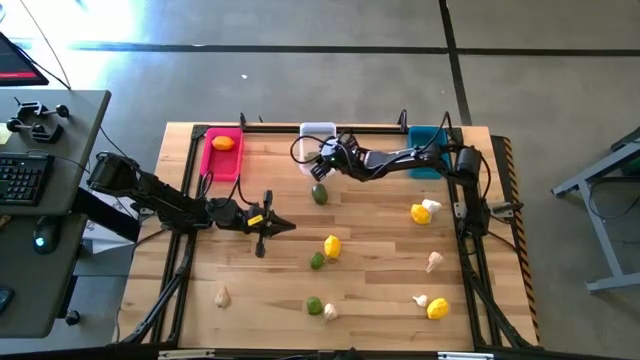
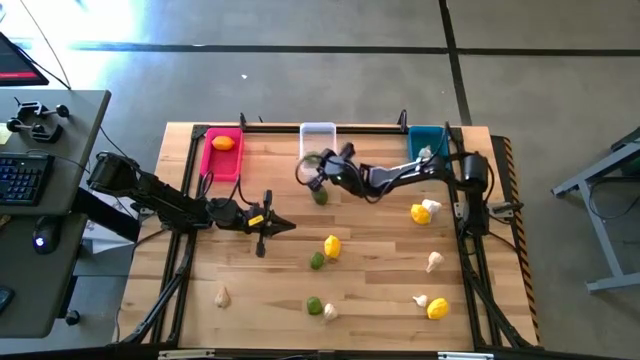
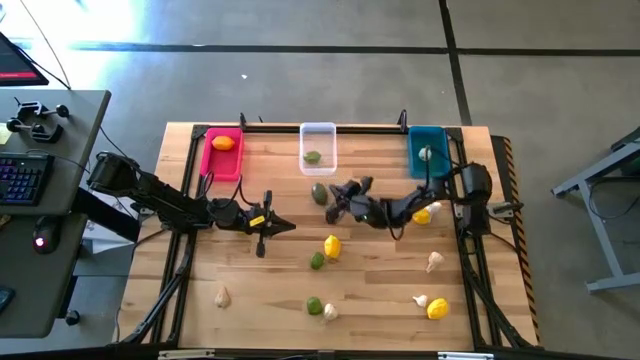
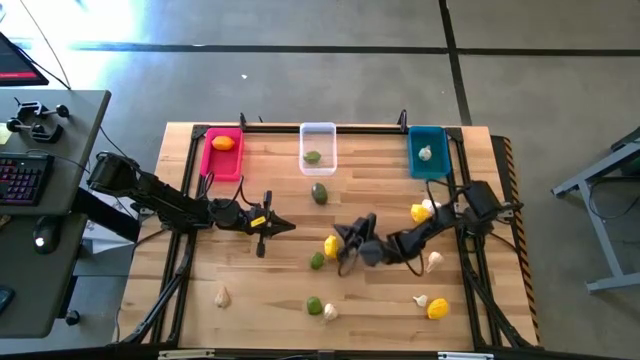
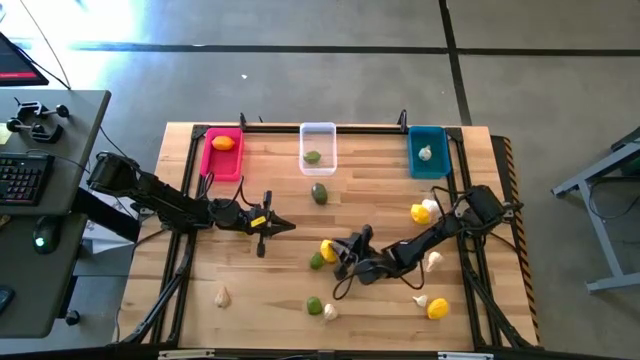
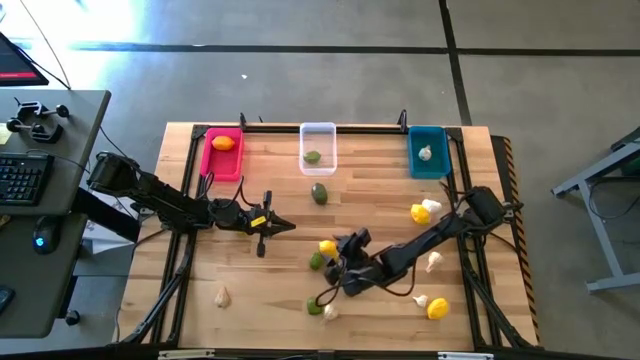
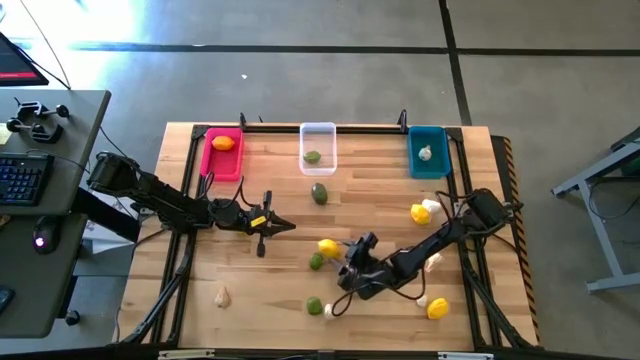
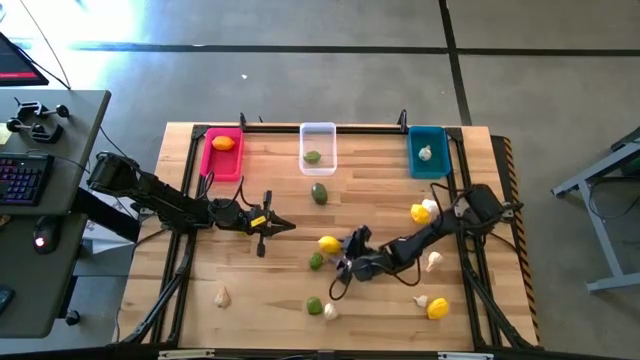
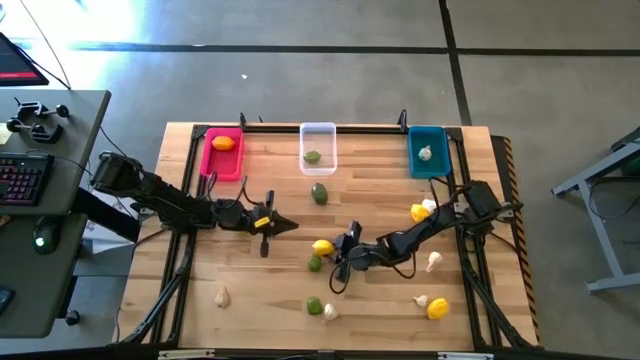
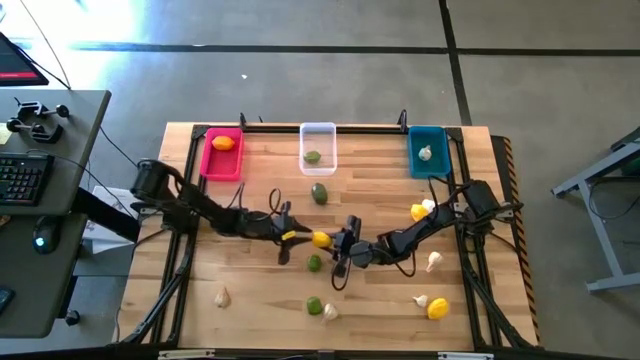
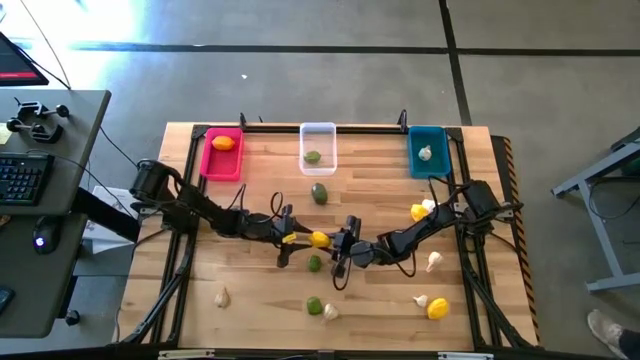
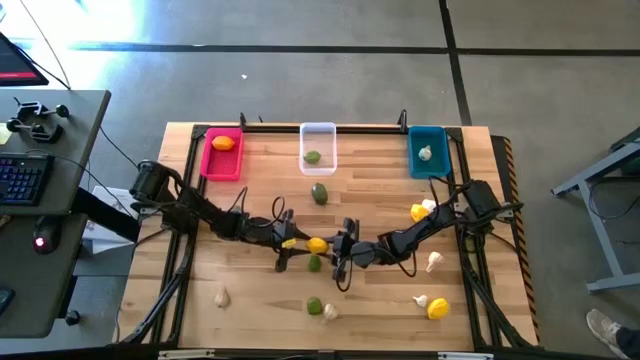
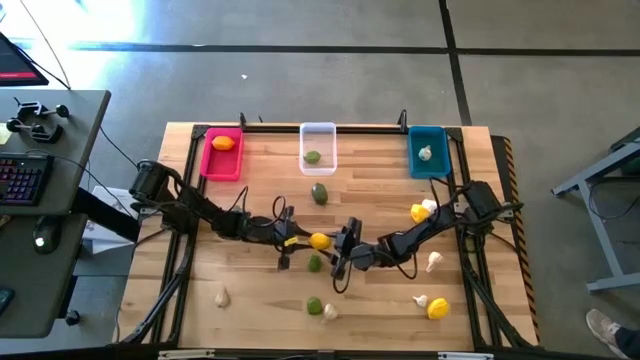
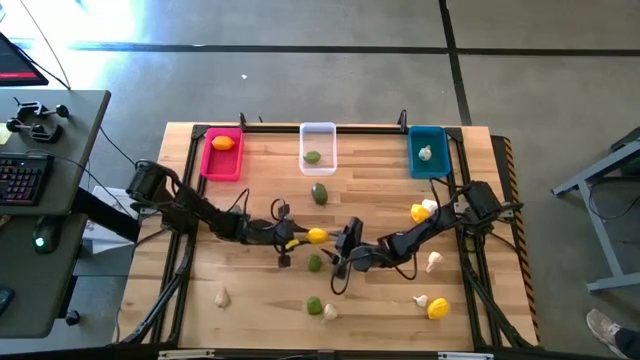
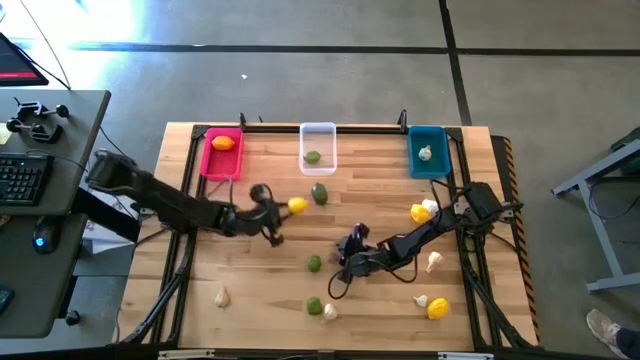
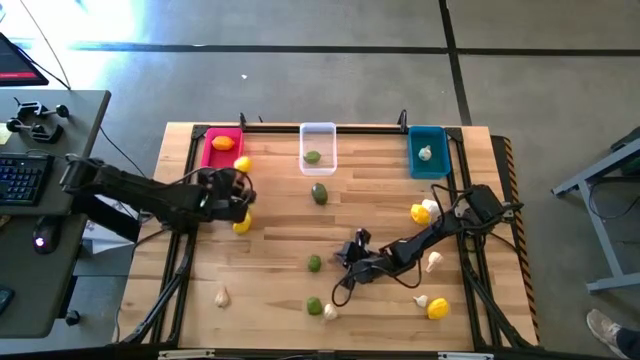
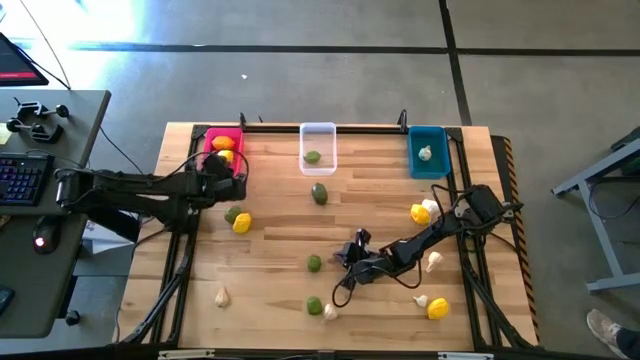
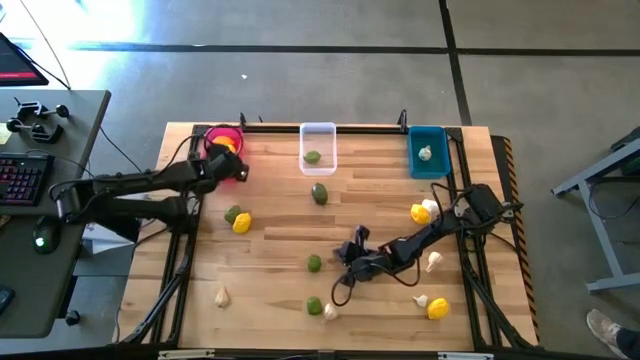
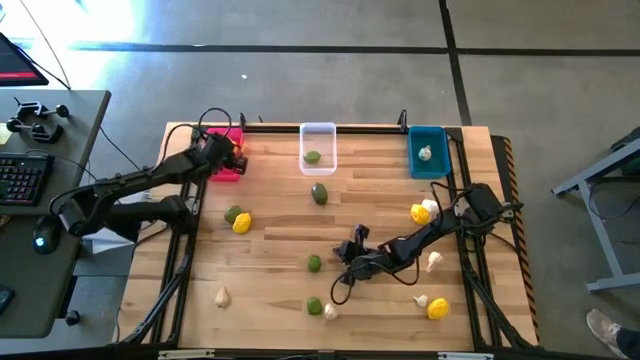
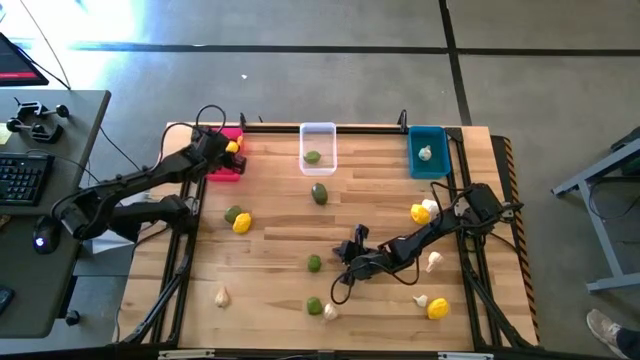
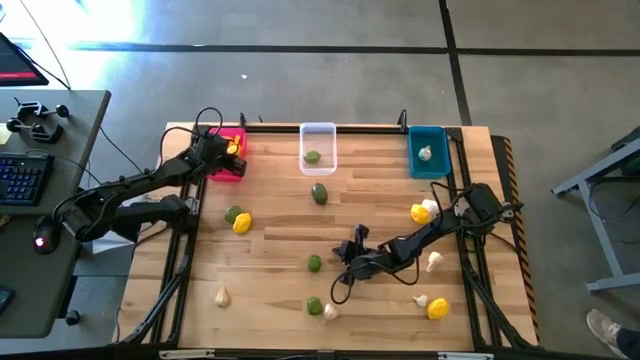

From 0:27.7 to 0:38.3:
Task: Sort produce into baskets
Put the lemon into the pink bin

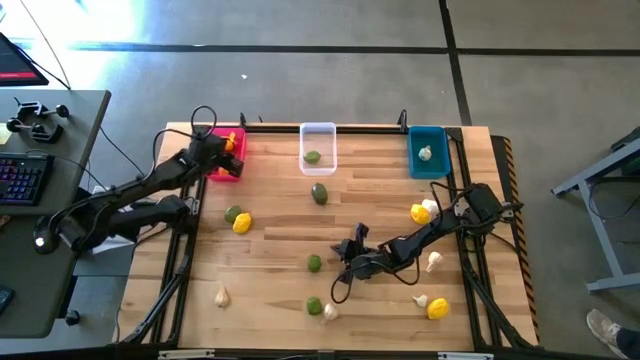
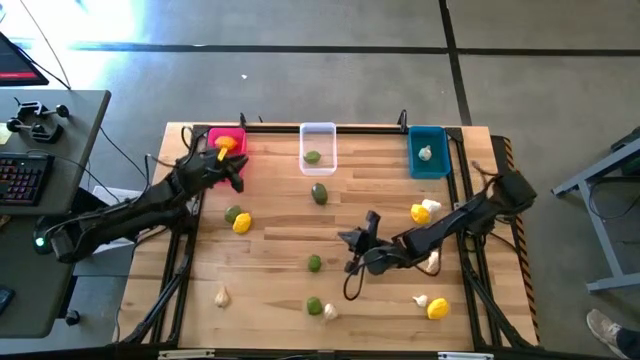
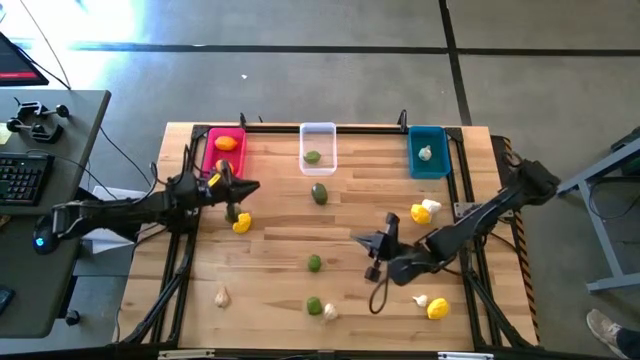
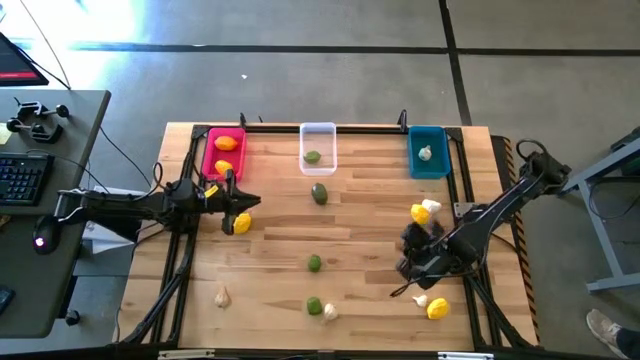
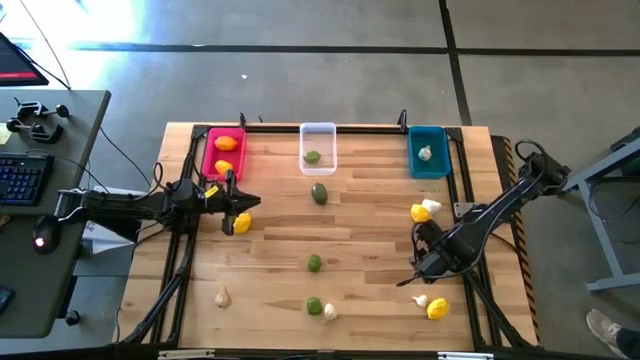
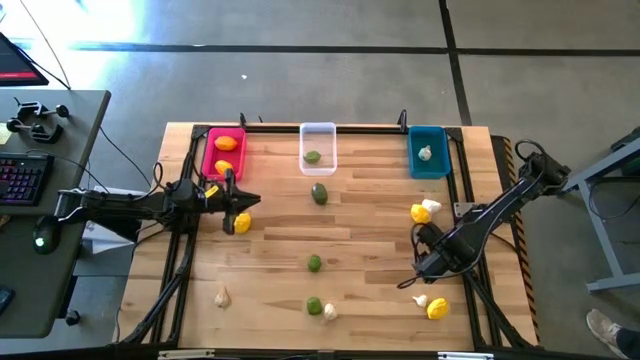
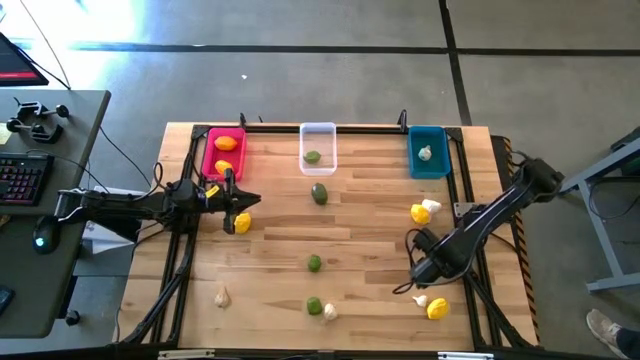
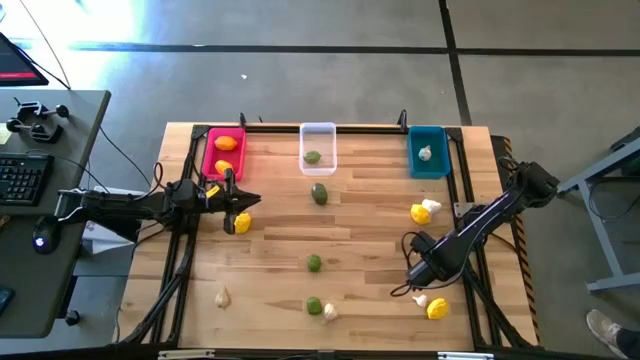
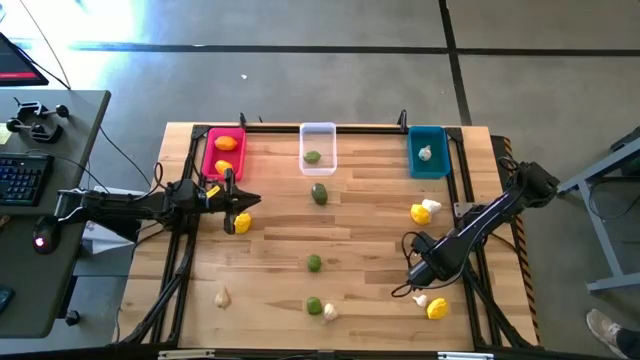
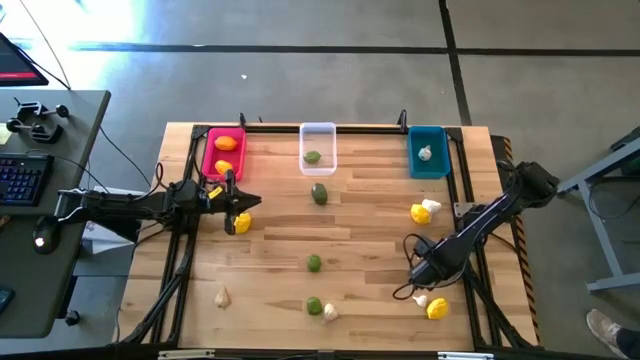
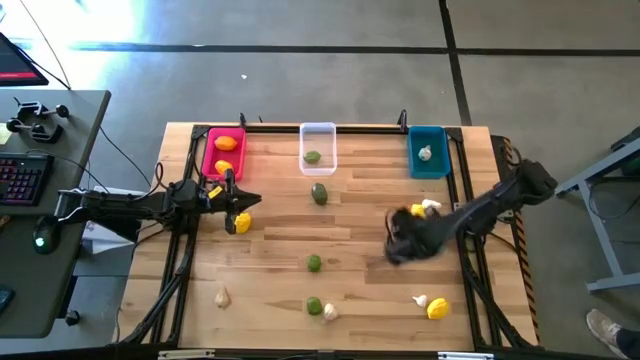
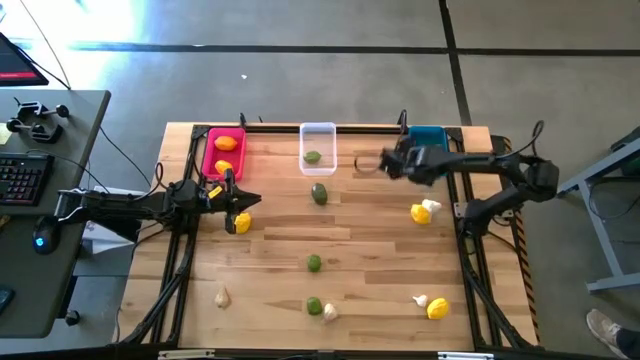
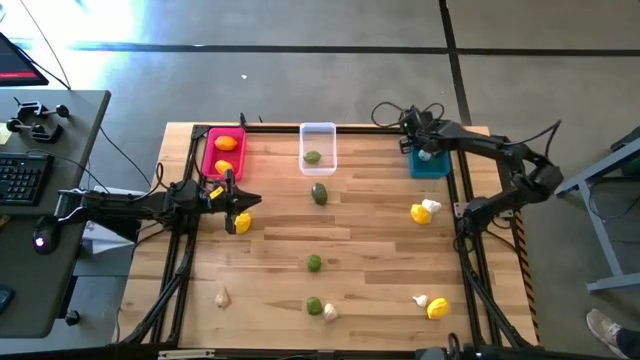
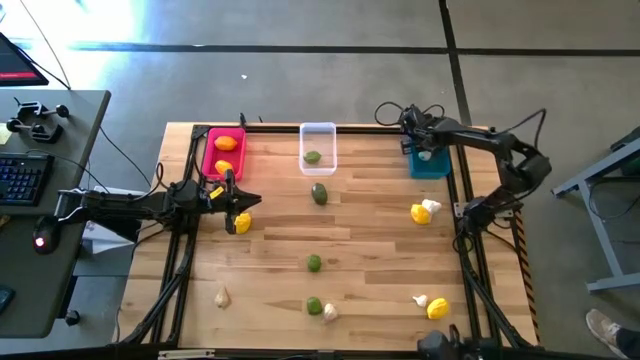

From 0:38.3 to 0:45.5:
Put the garlic into the blue bin

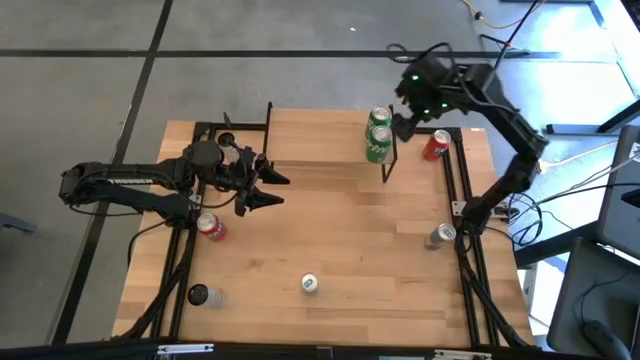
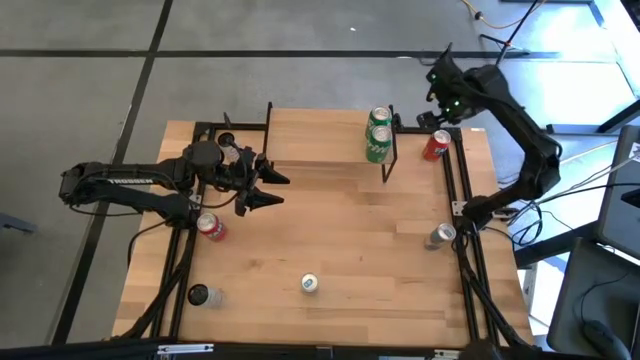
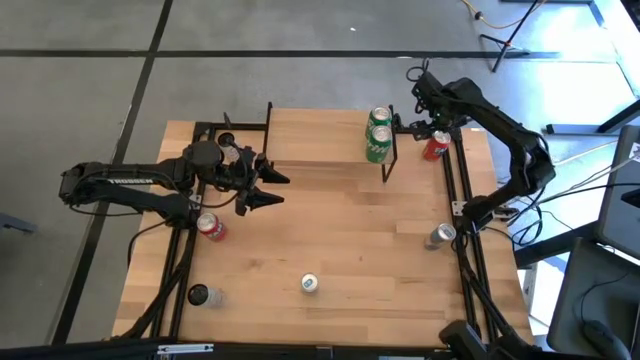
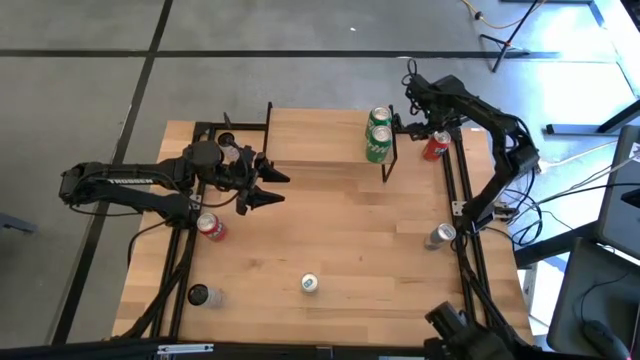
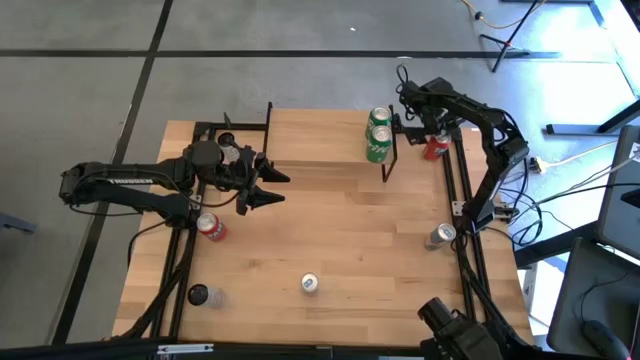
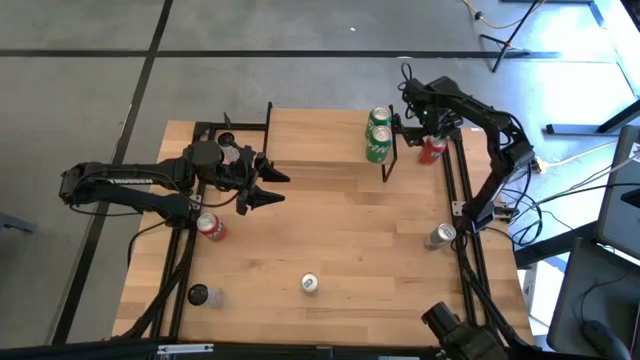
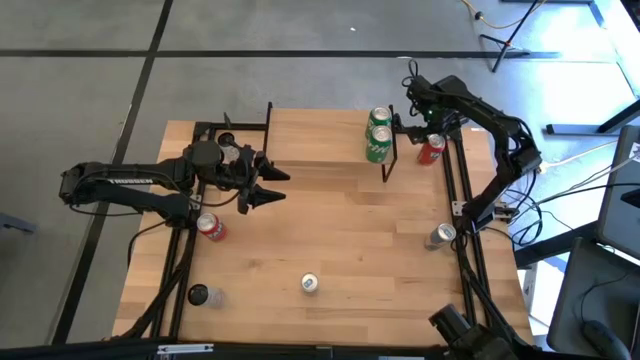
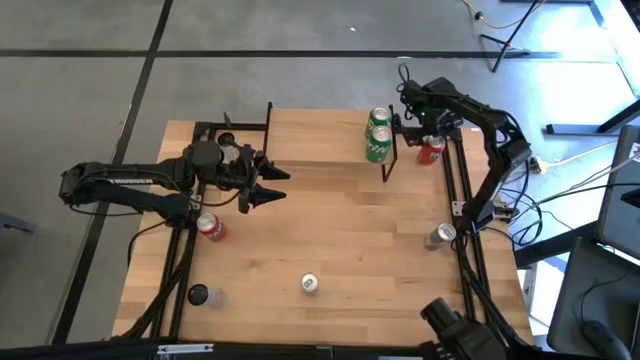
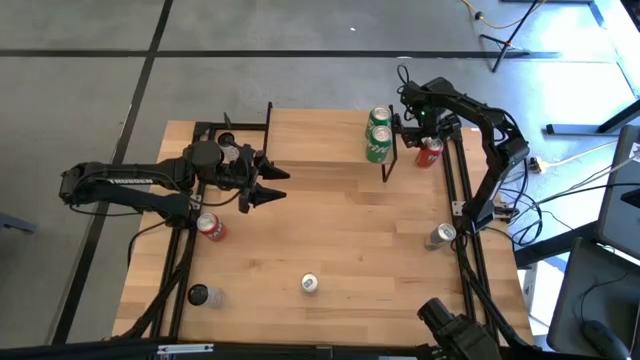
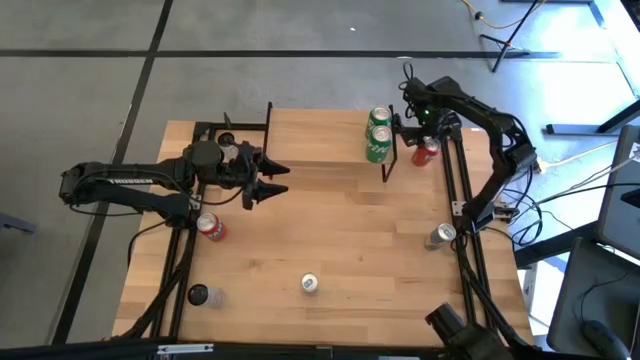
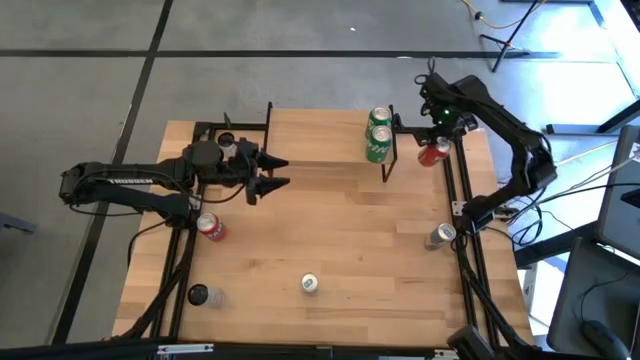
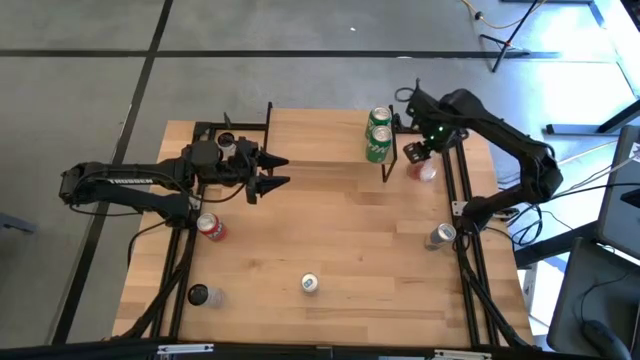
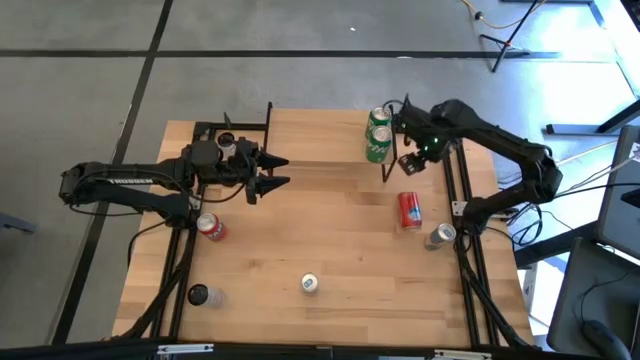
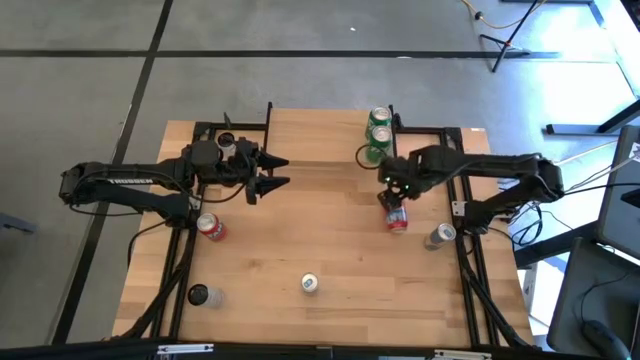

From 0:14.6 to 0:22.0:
Task: Place canned beverage on shelf
Put the right orange soda can on the shelf
